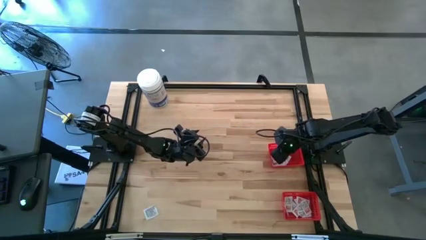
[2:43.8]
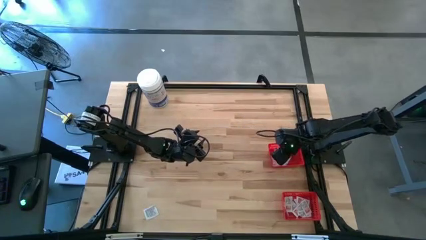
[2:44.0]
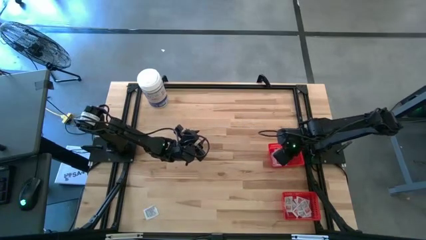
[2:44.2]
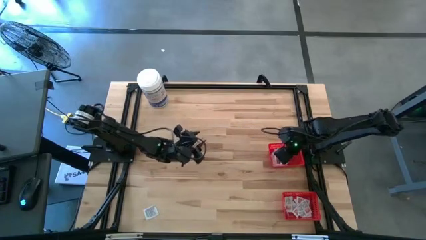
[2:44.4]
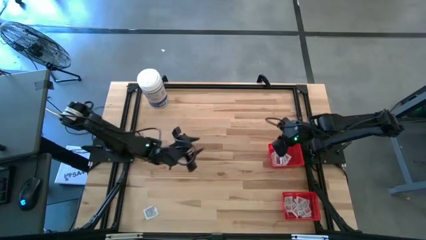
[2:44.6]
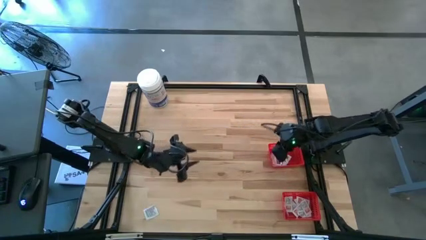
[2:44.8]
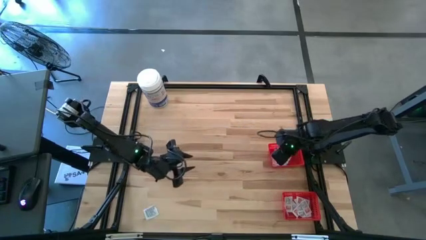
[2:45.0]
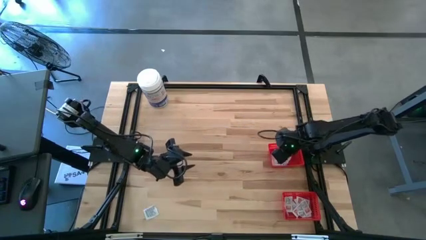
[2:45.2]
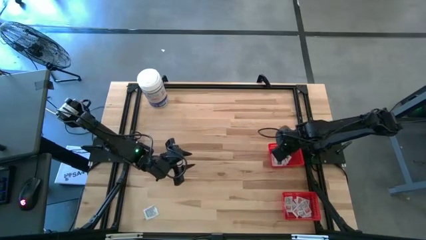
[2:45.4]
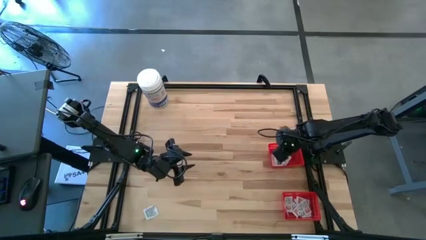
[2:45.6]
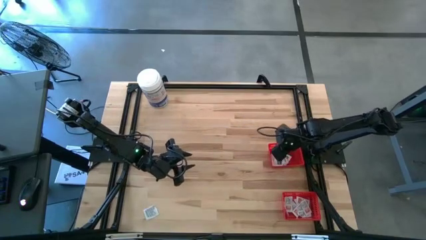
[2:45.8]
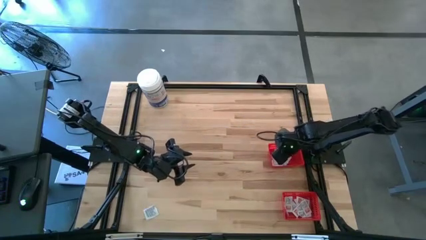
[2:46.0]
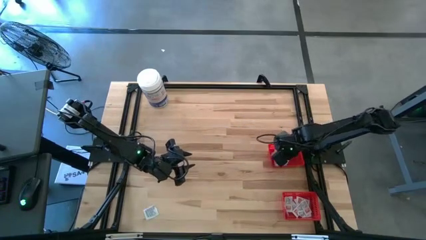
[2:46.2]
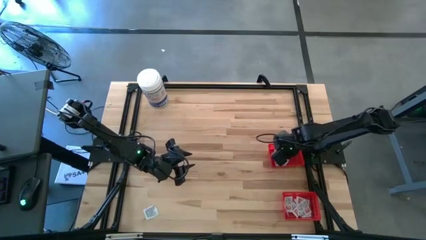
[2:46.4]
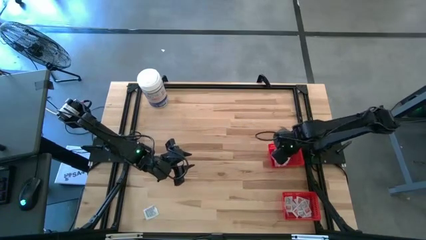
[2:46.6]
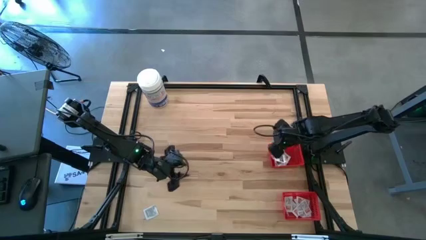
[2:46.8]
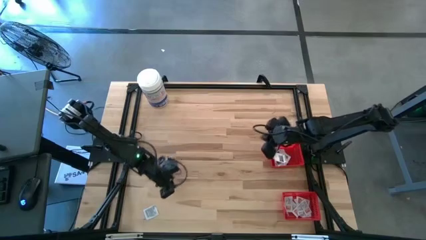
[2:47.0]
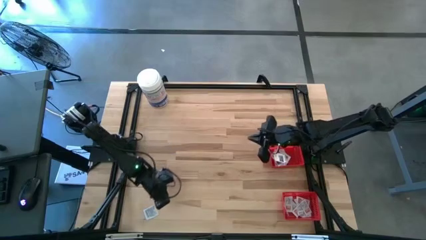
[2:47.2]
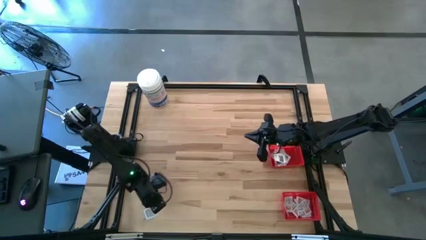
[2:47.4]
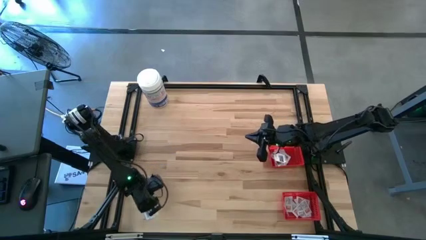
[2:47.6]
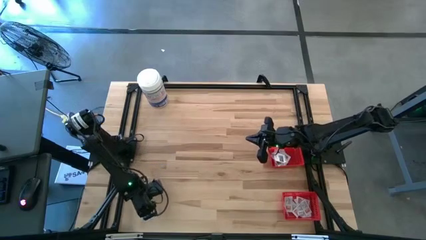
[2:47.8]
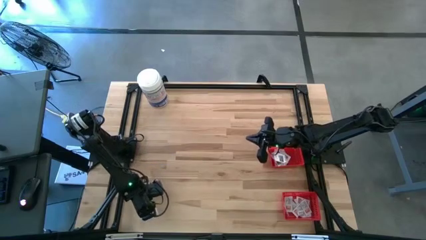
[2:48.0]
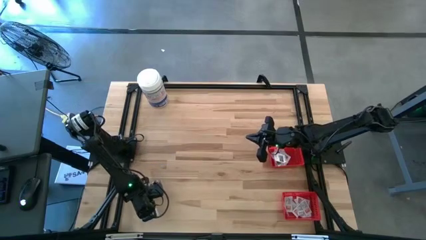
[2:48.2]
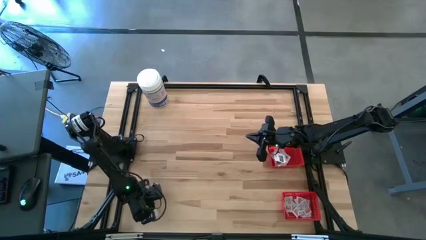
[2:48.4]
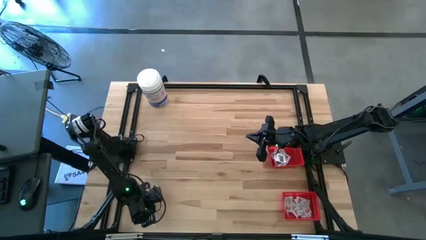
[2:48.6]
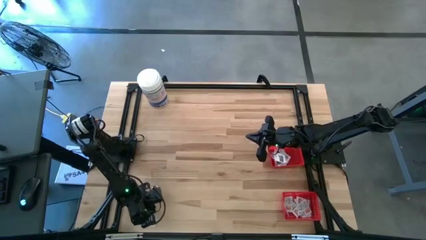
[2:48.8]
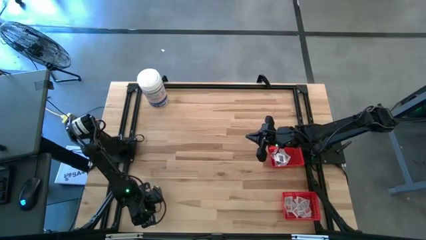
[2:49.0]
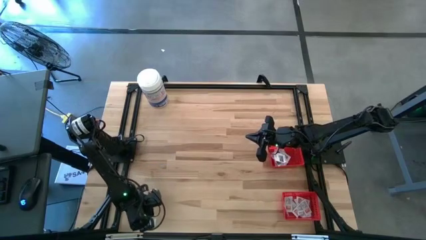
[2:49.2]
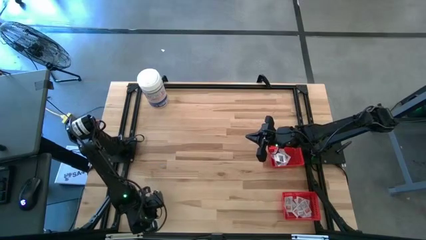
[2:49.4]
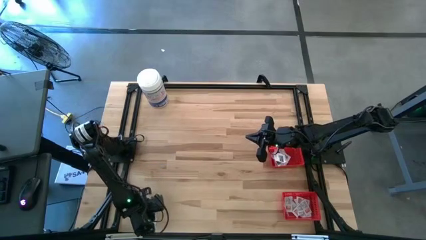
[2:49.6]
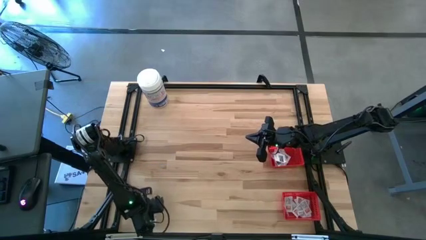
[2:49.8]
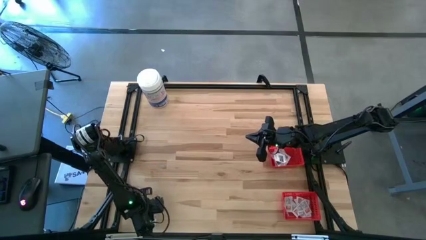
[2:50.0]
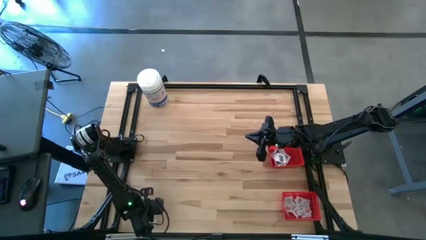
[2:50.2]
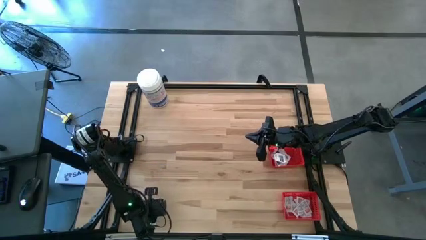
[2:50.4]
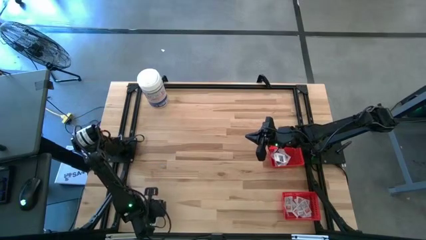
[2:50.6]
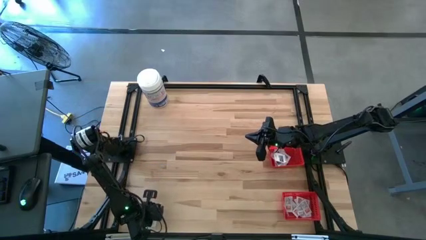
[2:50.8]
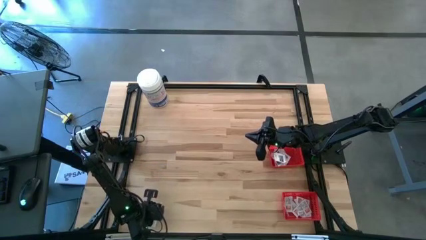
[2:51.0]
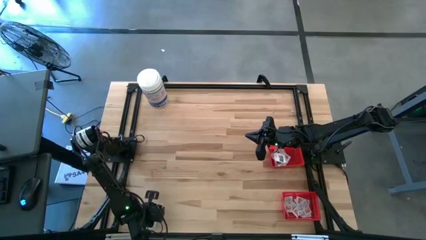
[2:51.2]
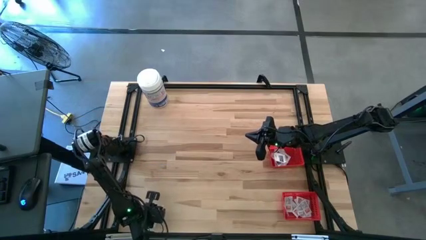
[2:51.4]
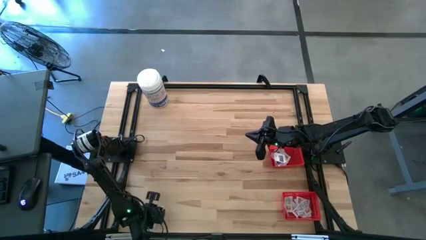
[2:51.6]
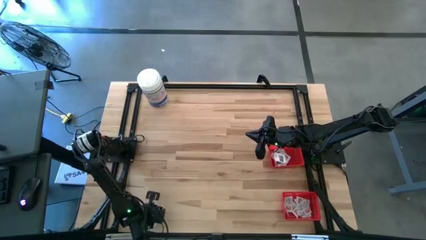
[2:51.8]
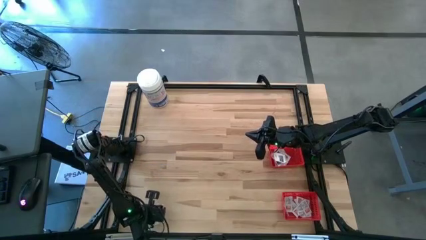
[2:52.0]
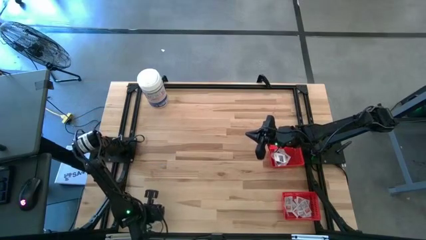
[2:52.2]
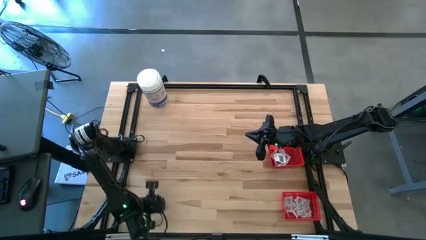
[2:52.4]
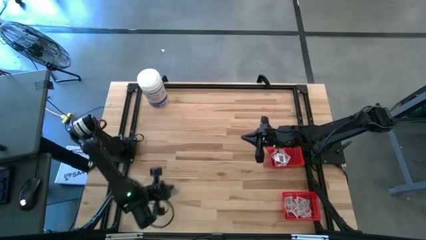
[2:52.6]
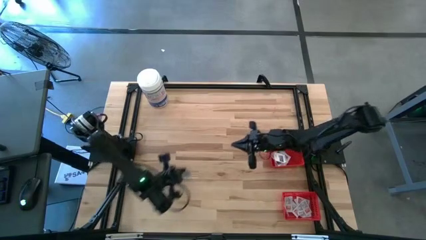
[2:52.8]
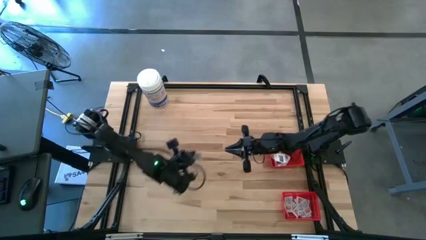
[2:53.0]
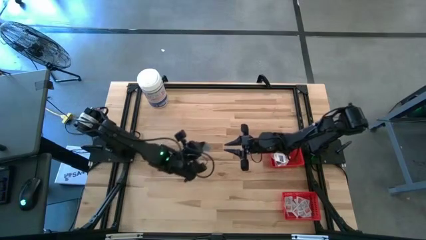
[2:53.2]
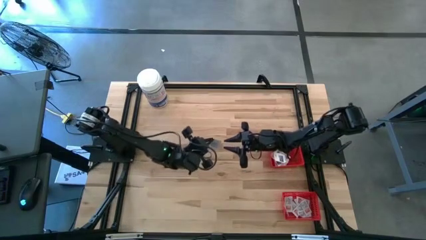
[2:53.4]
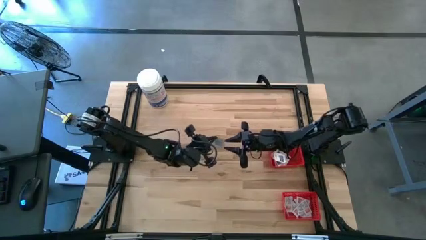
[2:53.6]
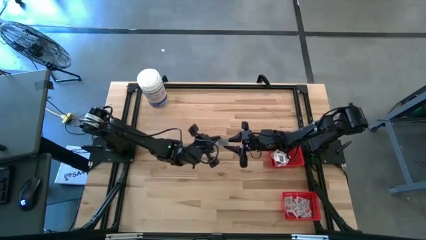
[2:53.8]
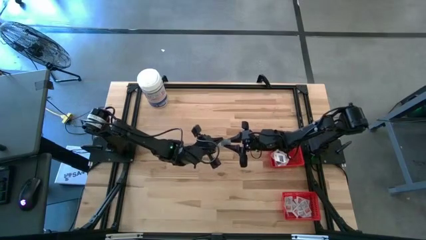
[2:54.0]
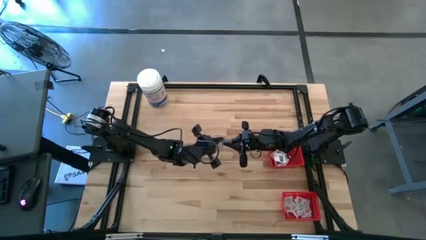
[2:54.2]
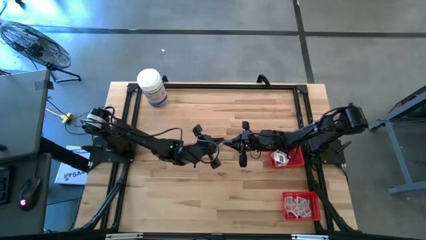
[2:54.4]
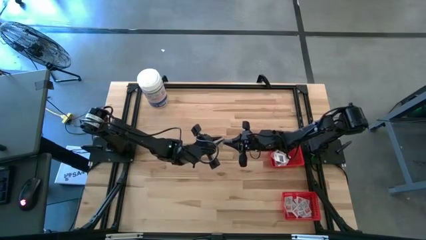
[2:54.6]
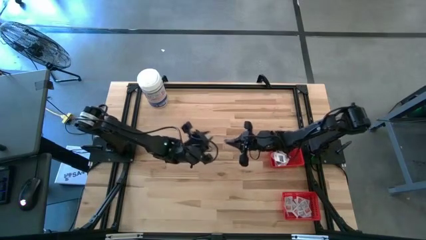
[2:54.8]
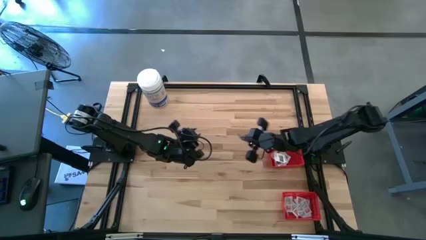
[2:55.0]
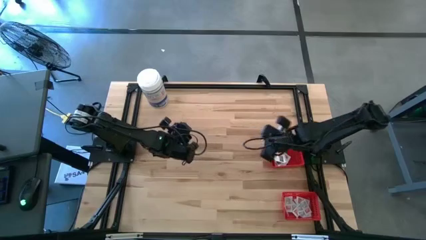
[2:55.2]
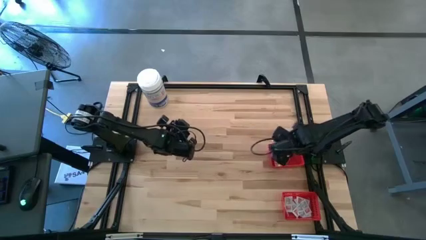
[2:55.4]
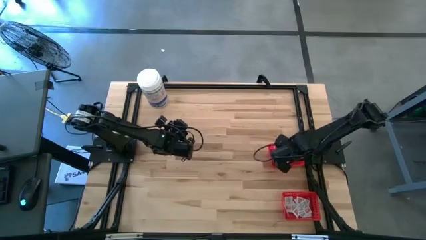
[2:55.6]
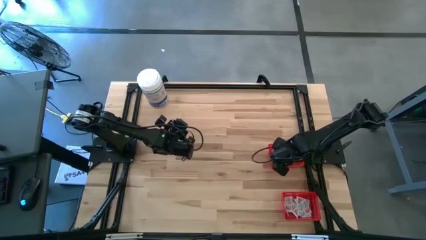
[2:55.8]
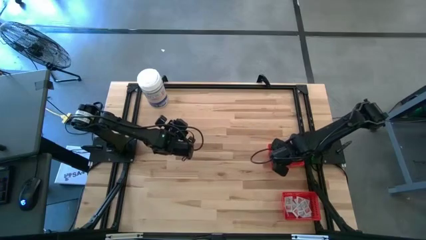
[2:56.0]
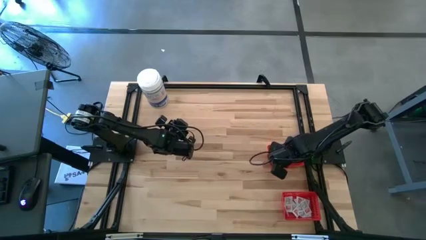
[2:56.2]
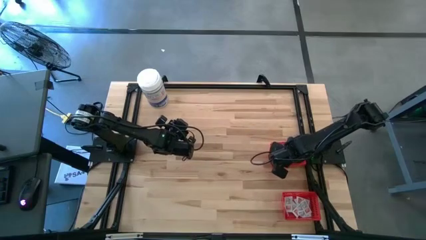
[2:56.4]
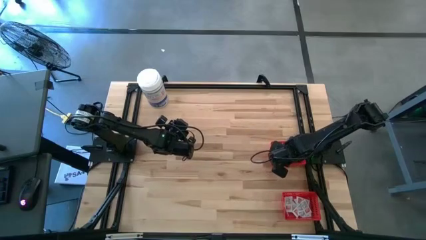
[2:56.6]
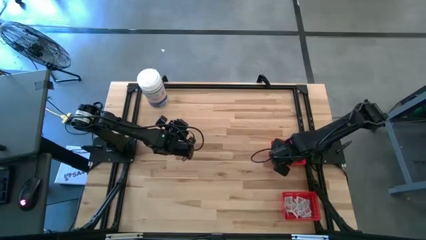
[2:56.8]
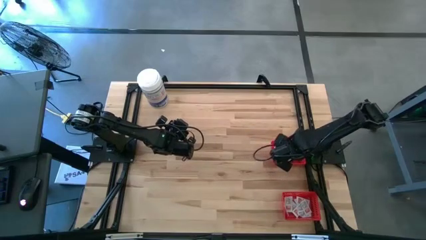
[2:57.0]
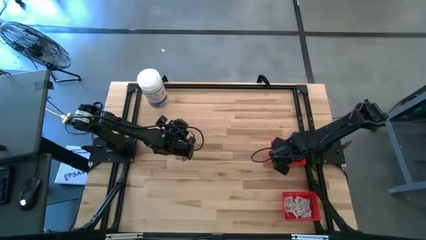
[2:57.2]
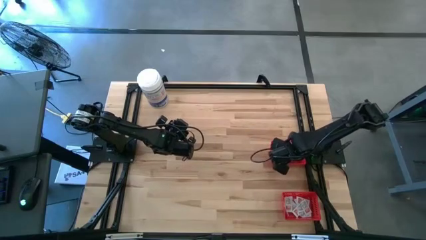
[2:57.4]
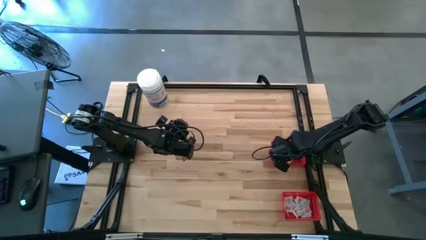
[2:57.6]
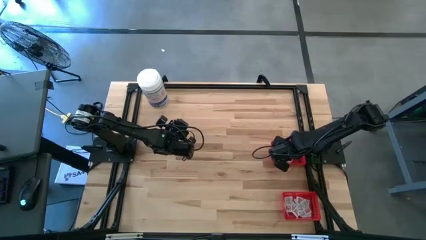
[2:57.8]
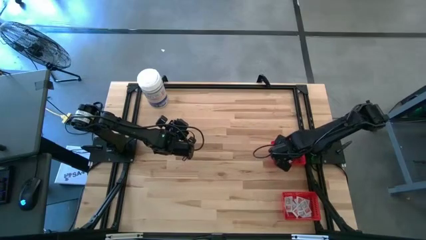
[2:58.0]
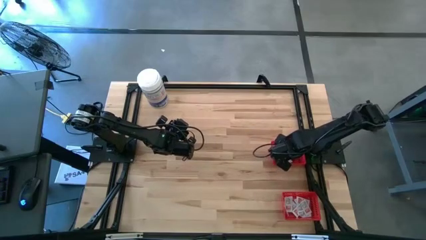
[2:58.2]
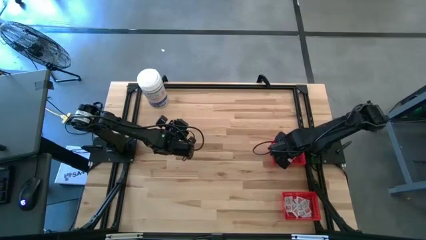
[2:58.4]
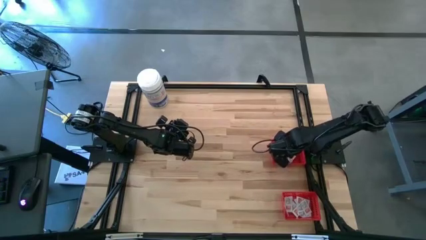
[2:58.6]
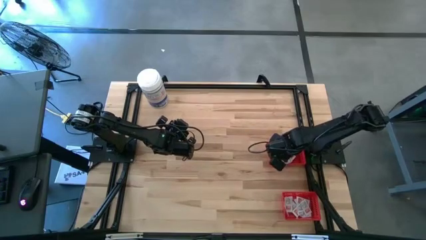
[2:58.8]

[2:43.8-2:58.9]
Task: Pick & Place First Aid Supplies
Put the black towelette pack into the top red basket
